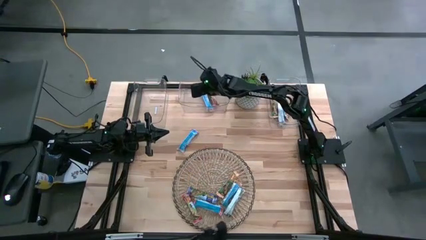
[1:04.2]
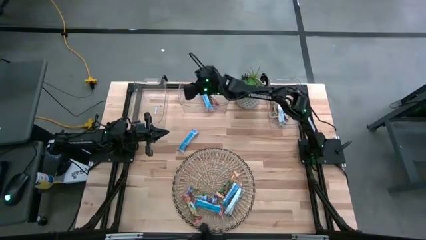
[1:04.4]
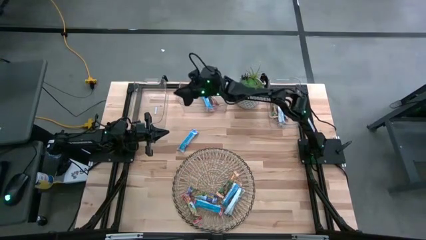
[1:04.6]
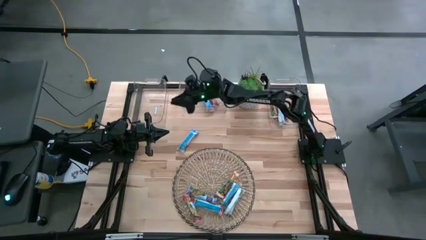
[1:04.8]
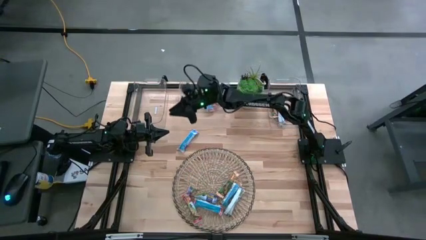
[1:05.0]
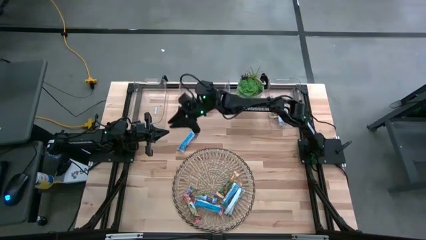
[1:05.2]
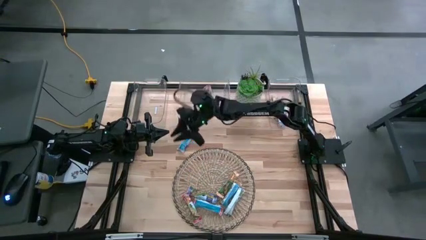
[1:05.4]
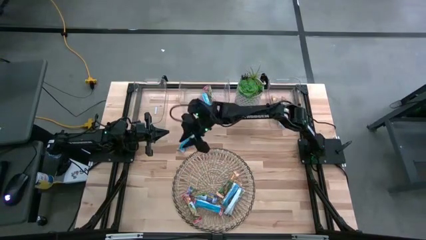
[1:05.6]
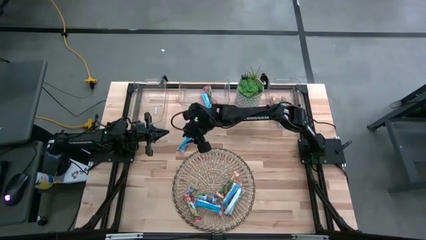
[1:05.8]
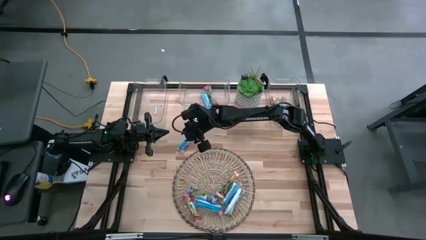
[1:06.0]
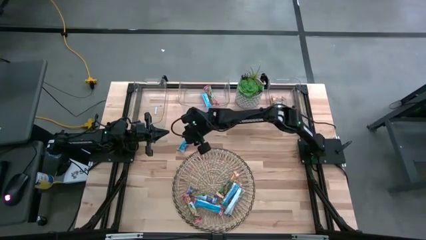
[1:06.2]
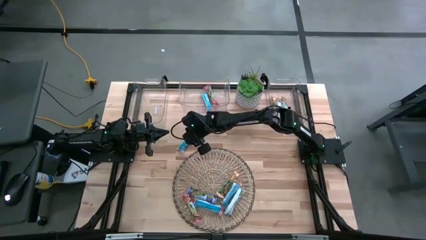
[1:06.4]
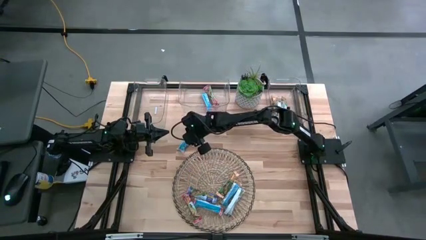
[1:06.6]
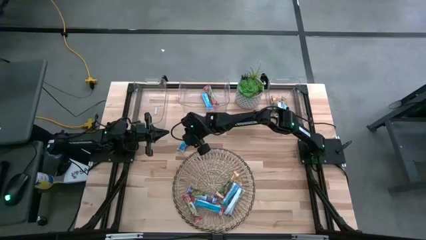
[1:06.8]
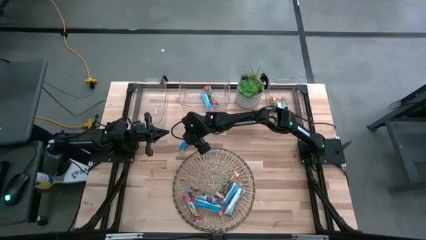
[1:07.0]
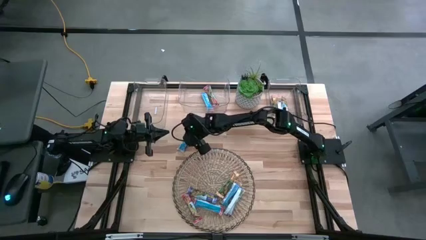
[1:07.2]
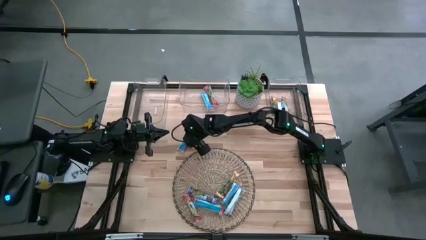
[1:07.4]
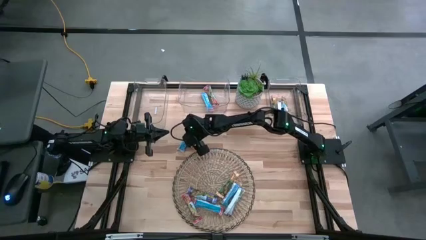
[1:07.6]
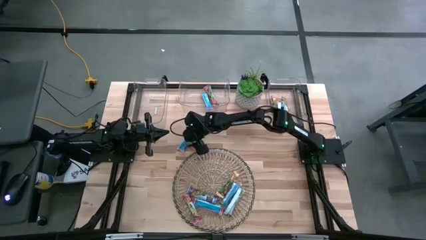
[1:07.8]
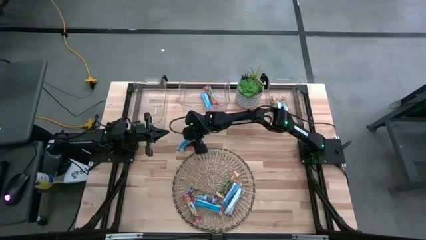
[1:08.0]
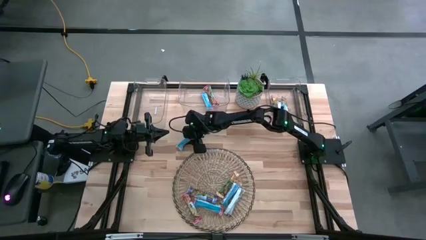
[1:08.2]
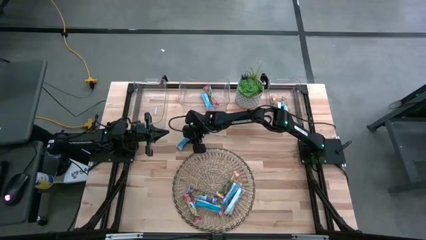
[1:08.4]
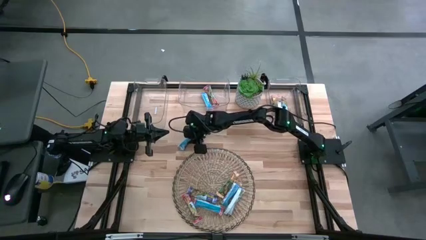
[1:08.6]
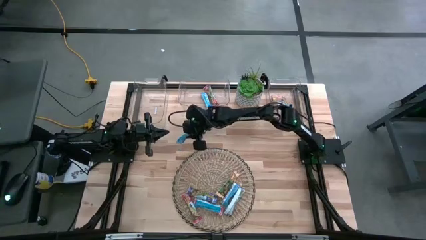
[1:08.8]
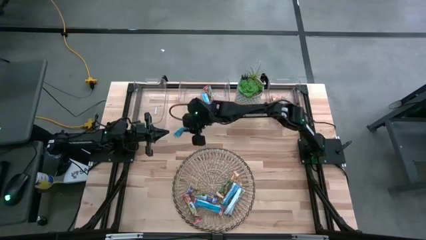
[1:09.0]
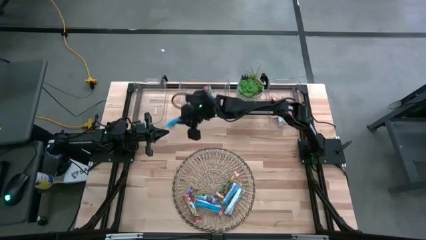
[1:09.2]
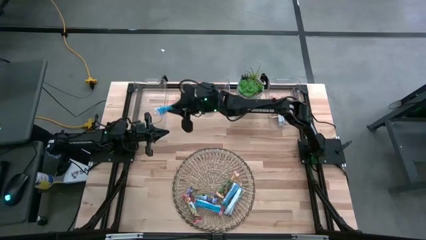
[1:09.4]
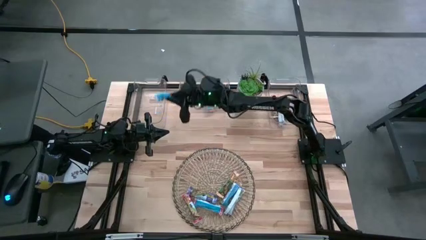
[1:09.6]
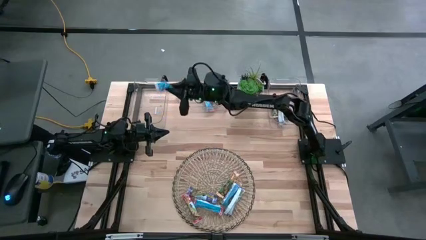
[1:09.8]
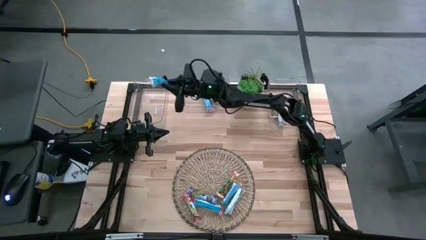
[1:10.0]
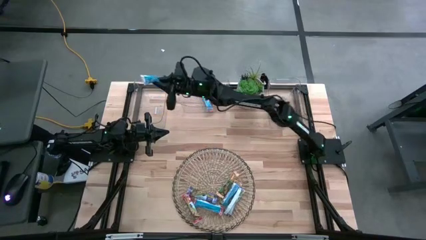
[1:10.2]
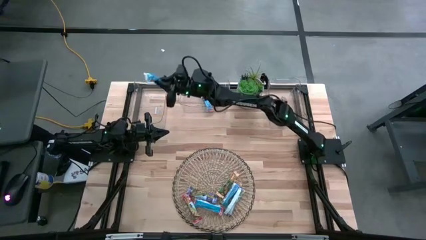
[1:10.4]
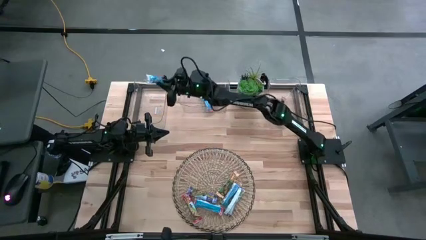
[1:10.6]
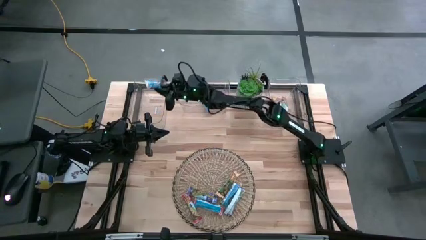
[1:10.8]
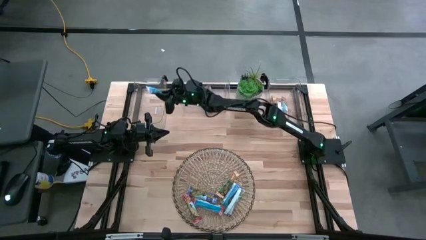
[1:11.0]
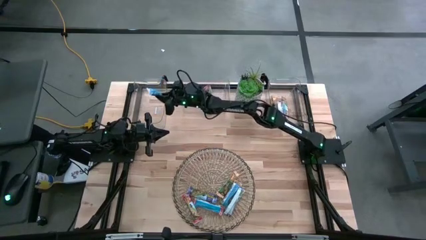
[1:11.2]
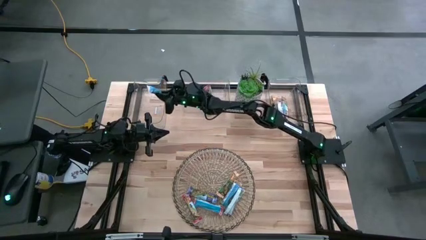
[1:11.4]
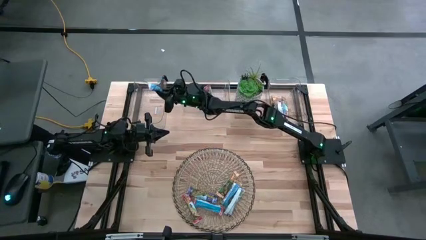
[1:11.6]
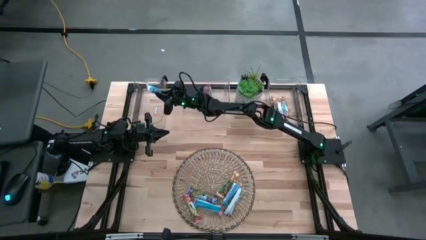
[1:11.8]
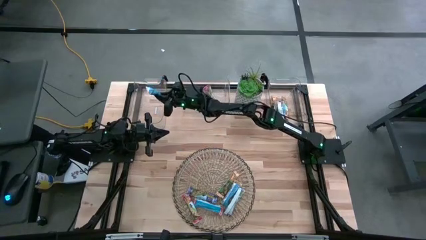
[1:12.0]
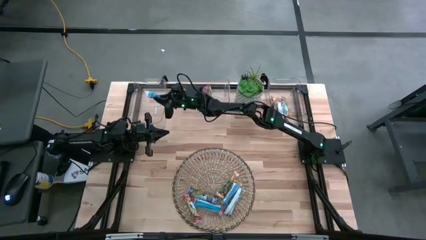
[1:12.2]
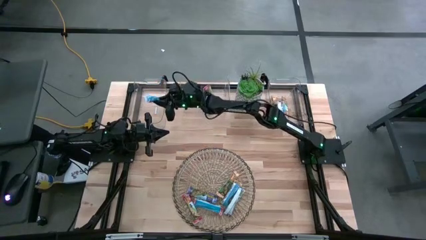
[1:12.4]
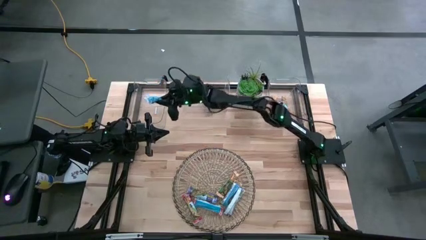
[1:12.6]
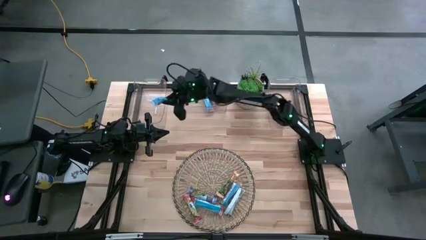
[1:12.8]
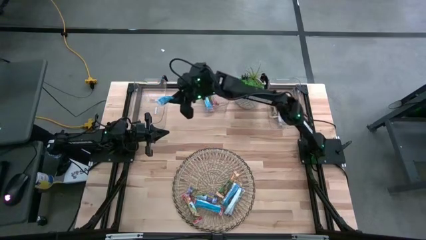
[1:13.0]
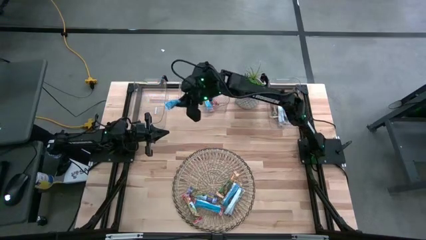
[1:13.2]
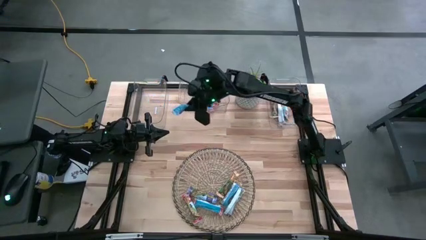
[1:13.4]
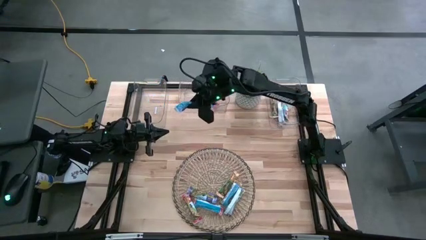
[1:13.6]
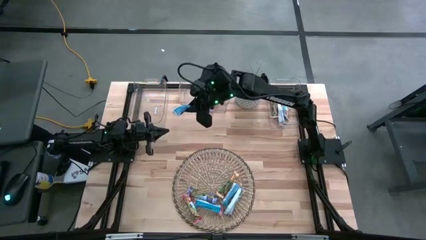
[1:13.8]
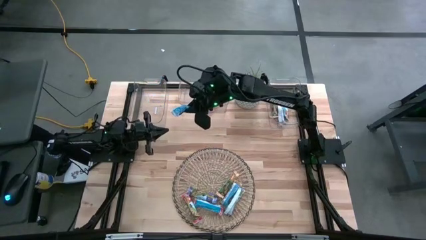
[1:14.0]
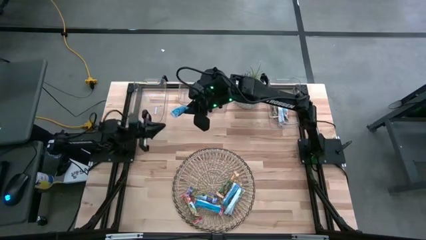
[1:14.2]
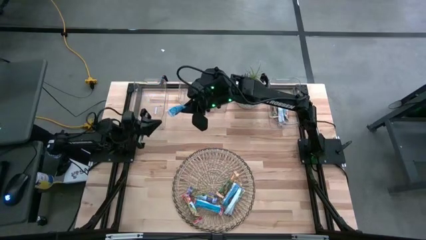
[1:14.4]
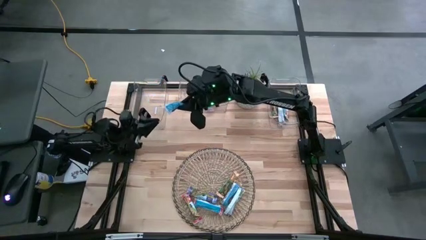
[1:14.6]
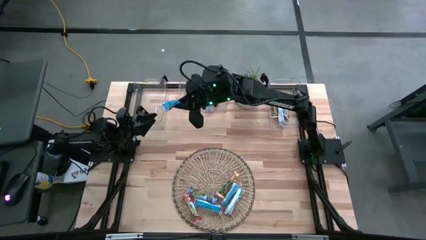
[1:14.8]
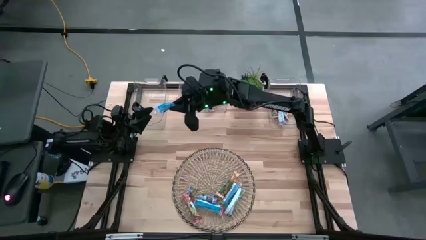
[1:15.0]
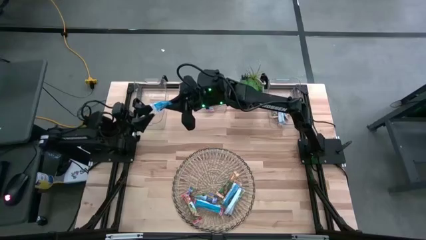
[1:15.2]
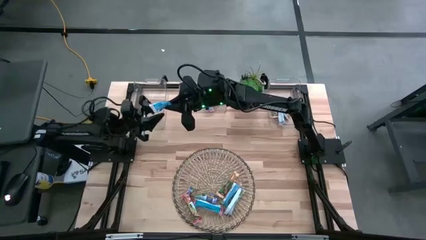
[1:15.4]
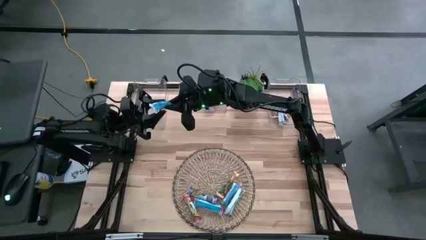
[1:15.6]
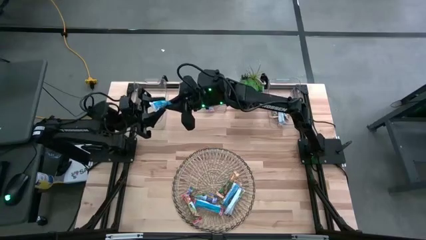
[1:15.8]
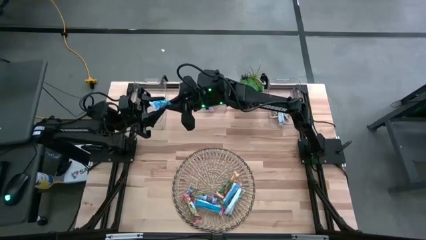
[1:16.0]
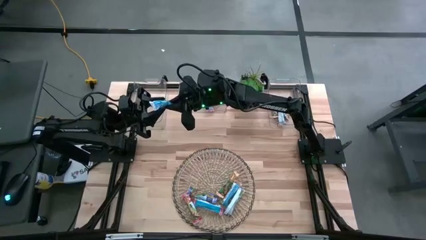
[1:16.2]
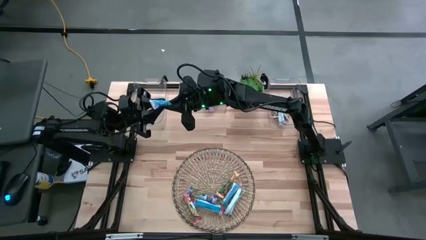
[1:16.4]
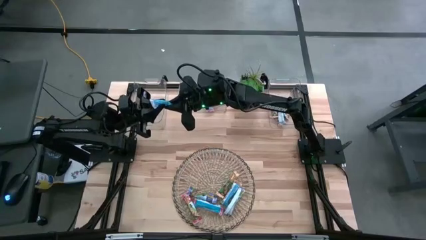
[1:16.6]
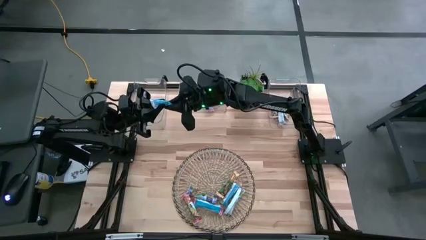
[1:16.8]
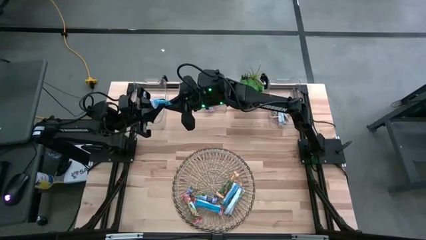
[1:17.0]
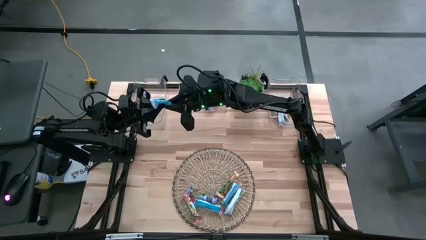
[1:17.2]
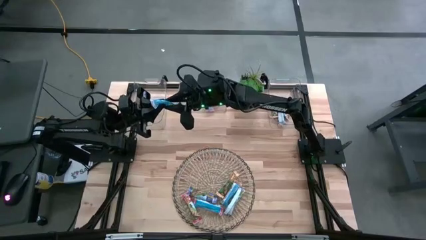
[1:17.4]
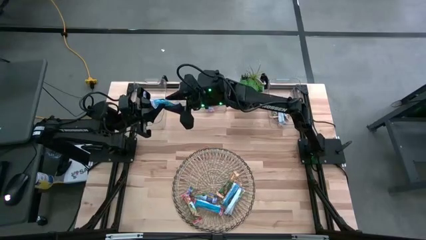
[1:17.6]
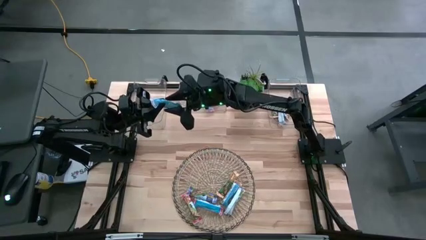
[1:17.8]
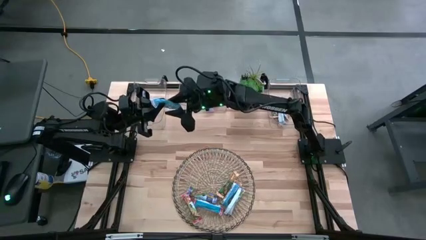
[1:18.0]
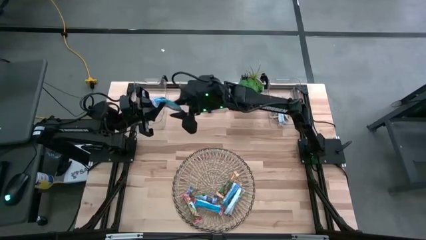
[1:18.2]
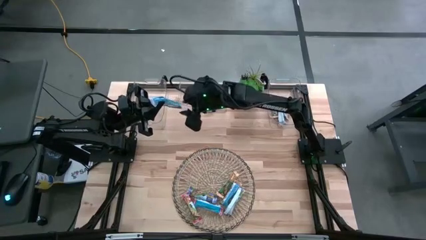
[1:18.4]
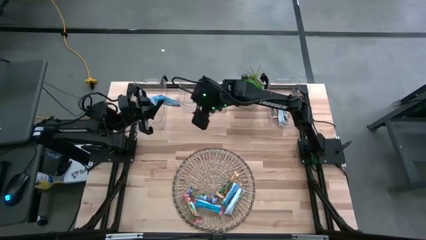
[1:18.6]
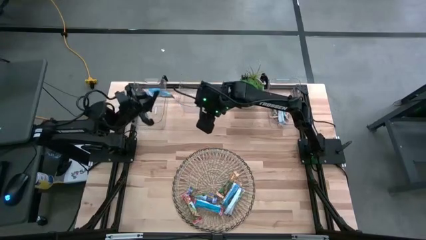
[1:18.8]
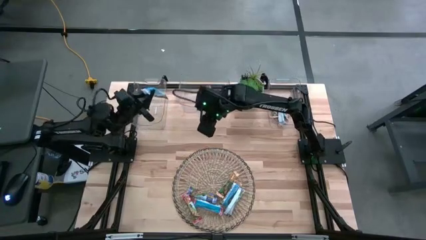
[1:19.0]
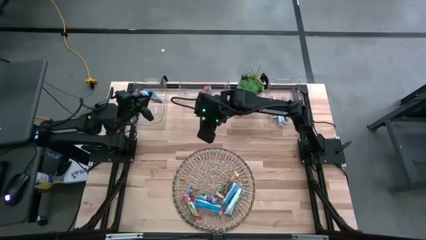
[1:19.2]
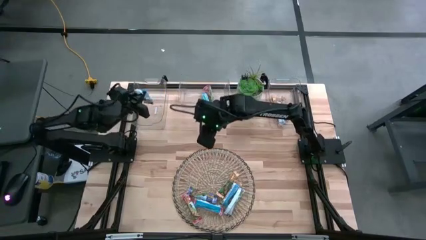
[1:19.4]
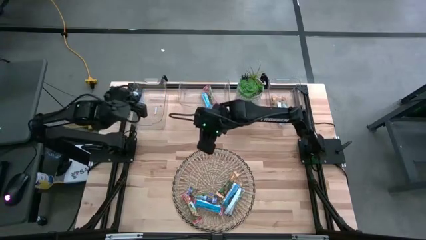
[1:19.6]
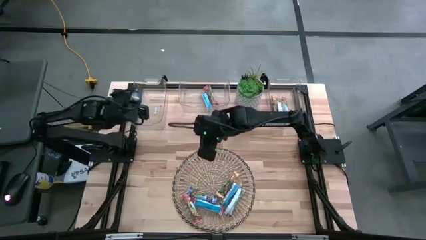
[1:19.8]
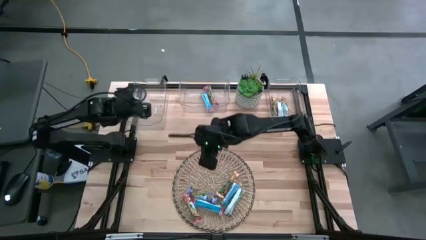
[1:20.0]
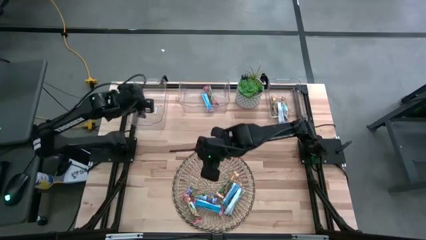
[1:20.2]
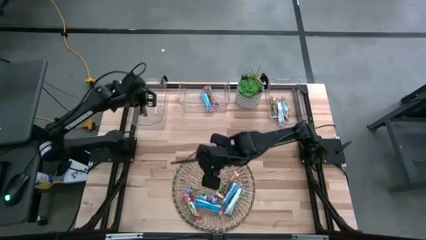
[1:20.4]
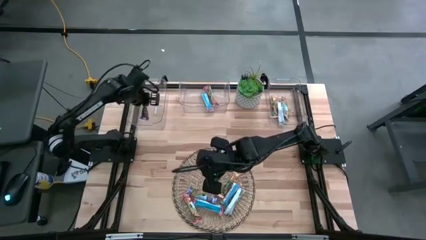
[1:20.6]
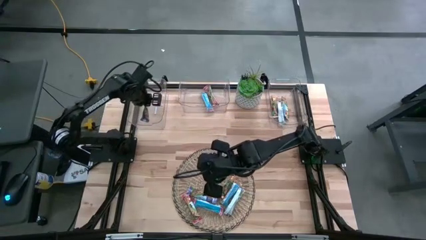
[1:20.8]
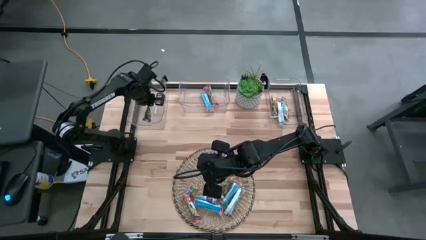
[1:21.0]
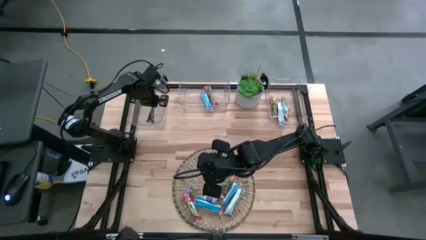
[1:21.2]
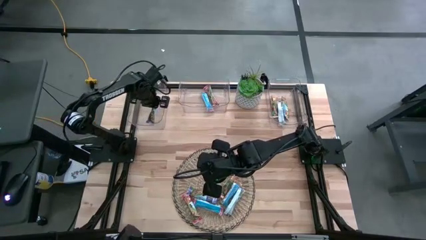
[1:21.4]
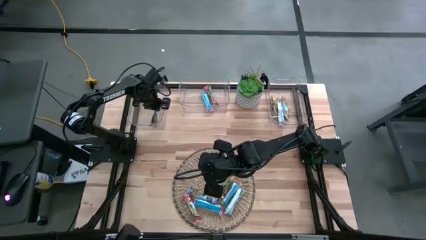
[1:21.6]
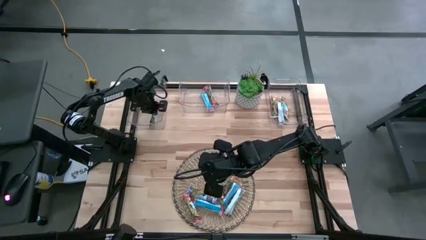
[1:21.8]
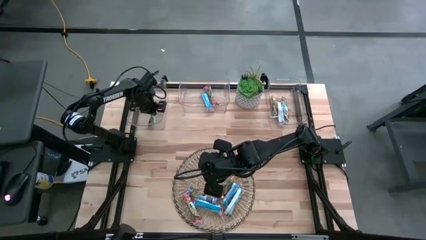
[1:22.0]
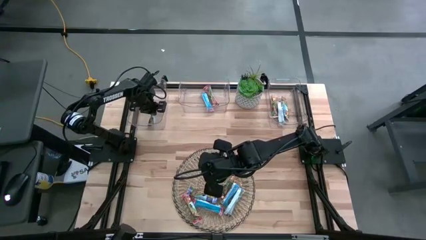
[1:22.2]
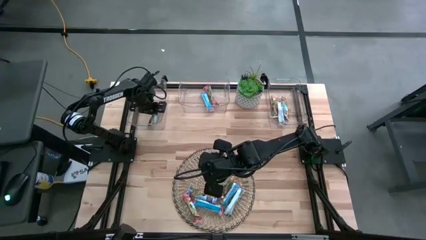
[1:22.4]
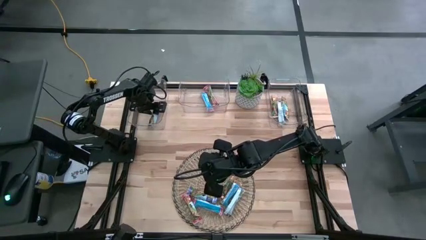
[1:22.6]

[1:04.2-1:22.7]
Task: Pick and place Granola Bars by type
Put the blue granola bar into the left transparent bin
